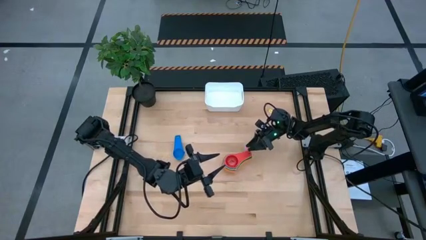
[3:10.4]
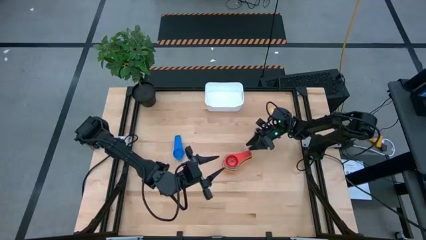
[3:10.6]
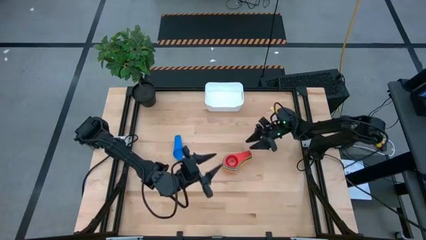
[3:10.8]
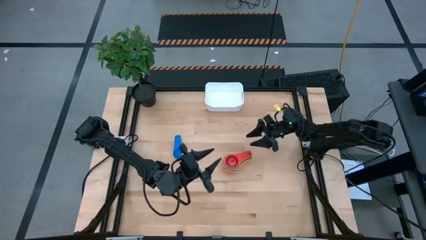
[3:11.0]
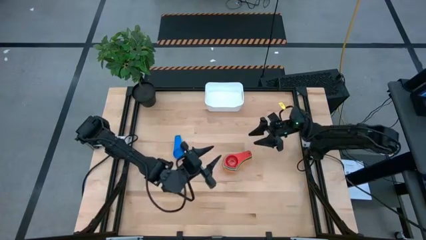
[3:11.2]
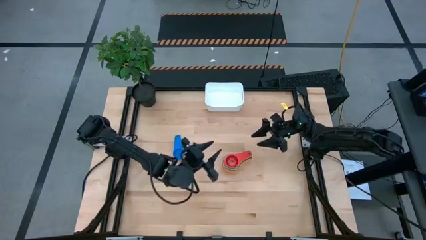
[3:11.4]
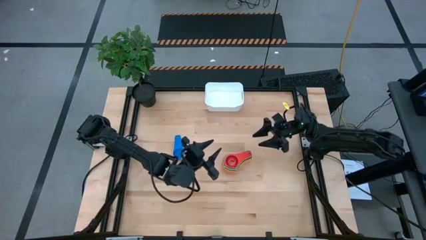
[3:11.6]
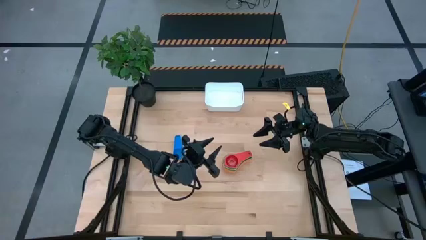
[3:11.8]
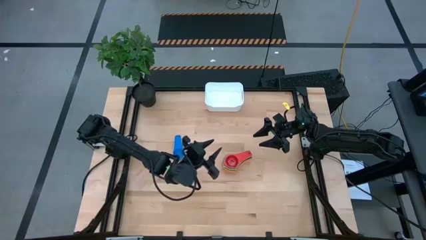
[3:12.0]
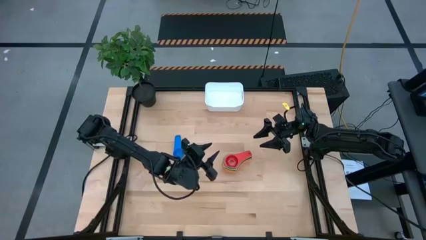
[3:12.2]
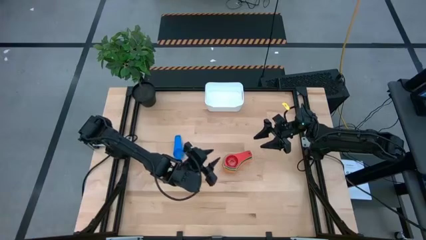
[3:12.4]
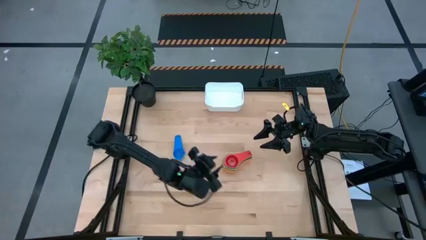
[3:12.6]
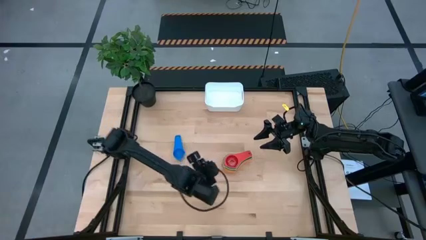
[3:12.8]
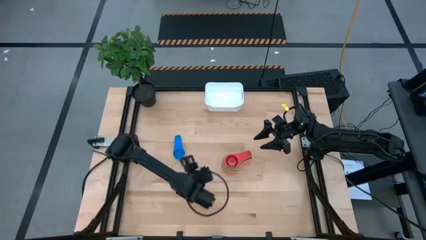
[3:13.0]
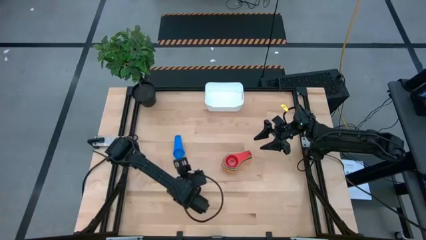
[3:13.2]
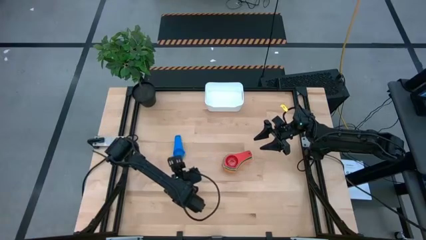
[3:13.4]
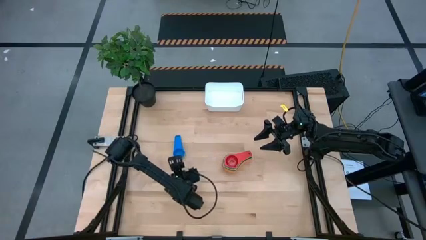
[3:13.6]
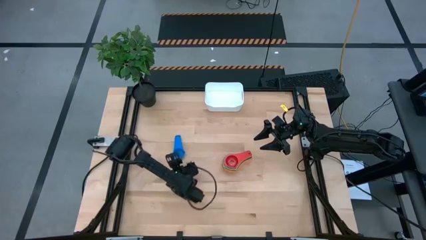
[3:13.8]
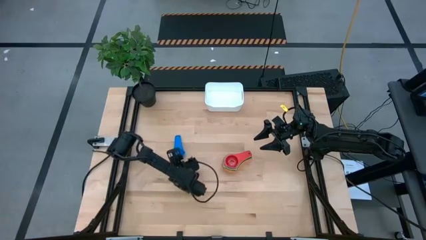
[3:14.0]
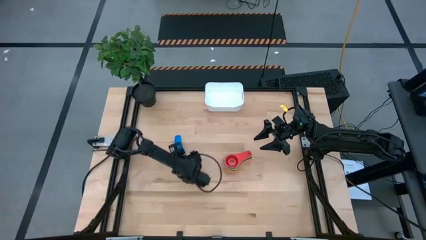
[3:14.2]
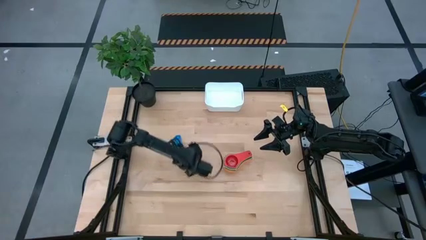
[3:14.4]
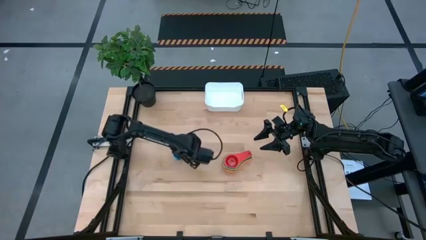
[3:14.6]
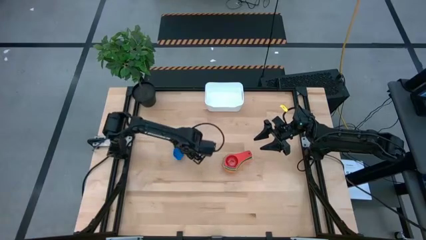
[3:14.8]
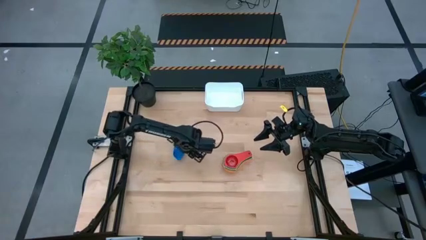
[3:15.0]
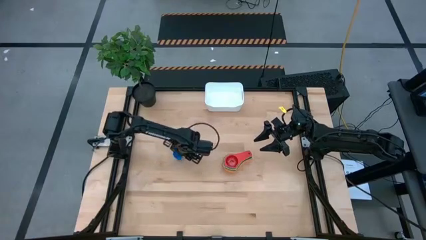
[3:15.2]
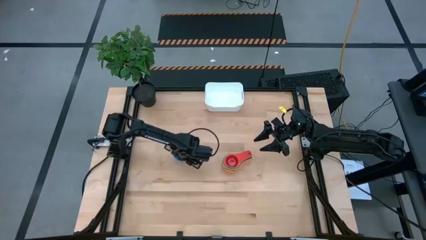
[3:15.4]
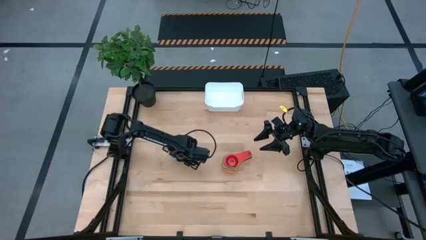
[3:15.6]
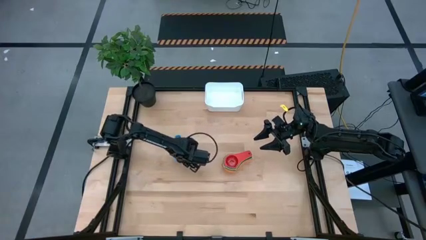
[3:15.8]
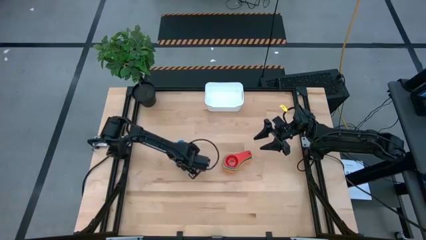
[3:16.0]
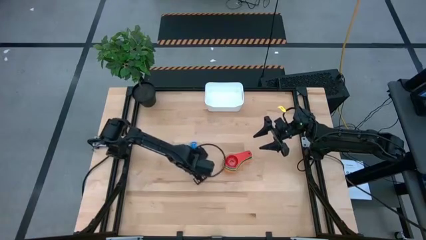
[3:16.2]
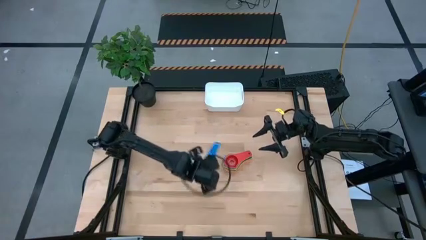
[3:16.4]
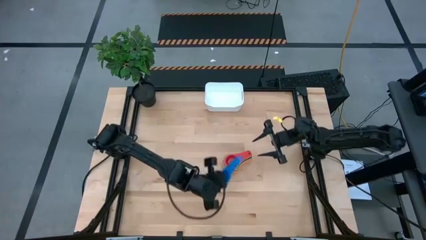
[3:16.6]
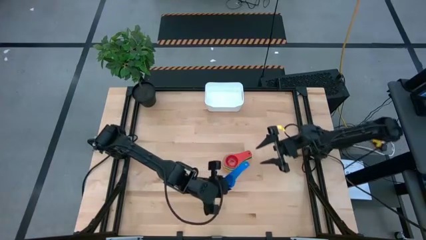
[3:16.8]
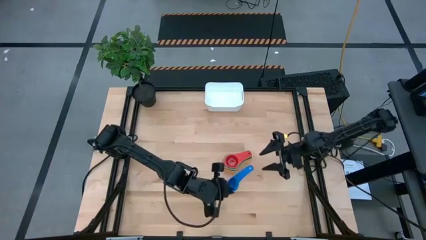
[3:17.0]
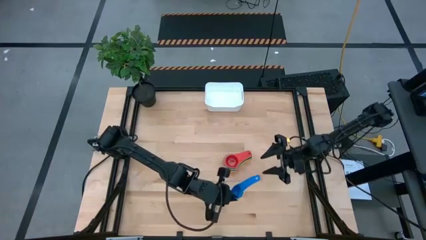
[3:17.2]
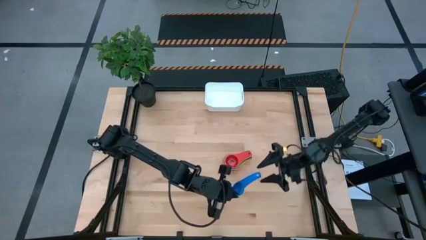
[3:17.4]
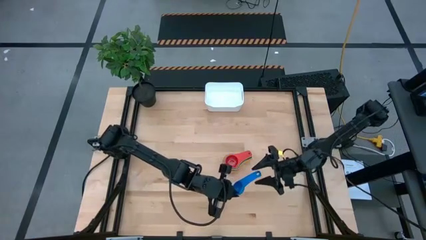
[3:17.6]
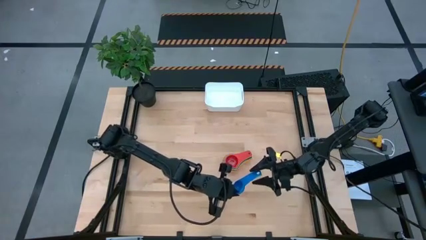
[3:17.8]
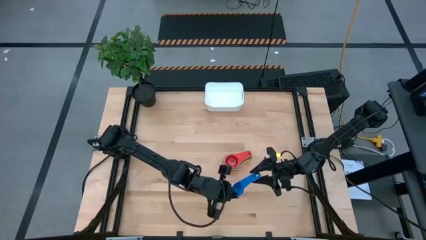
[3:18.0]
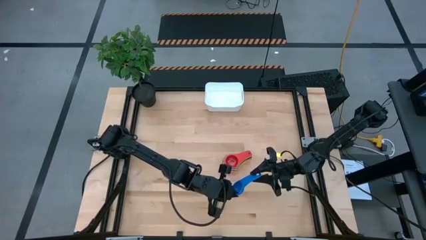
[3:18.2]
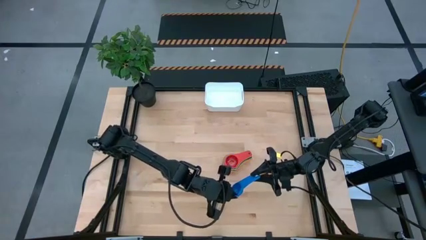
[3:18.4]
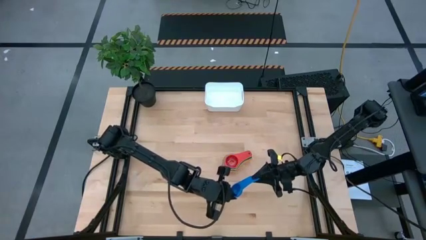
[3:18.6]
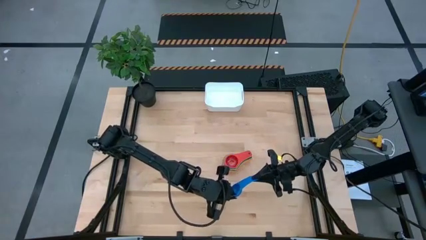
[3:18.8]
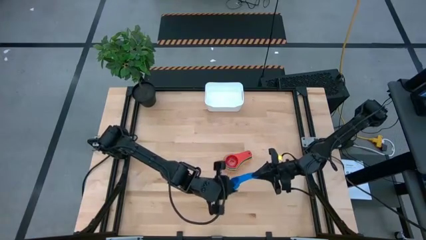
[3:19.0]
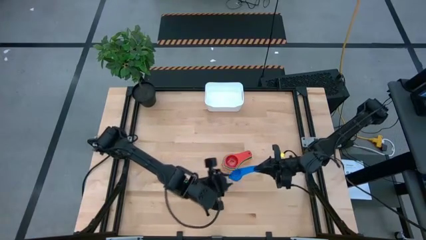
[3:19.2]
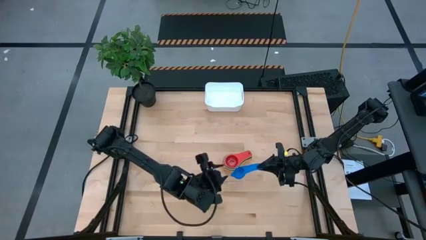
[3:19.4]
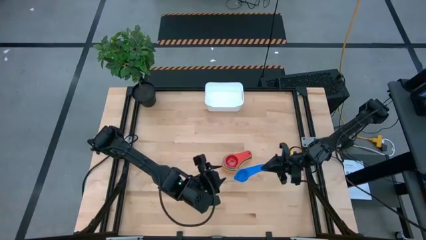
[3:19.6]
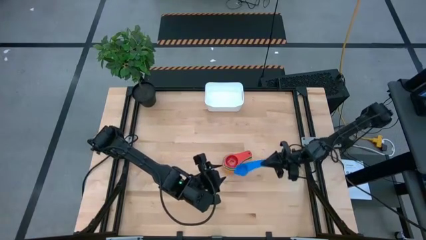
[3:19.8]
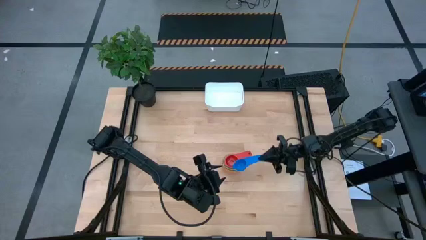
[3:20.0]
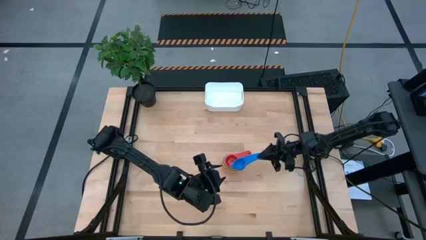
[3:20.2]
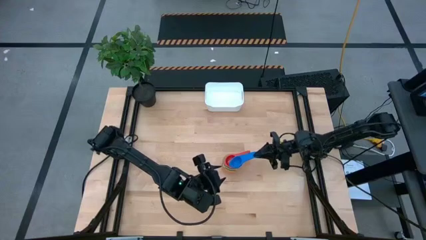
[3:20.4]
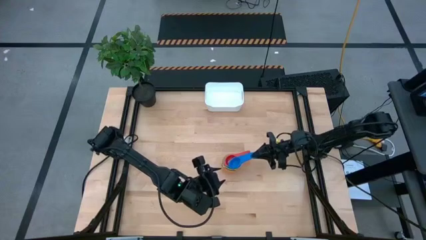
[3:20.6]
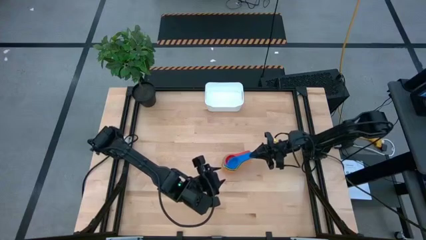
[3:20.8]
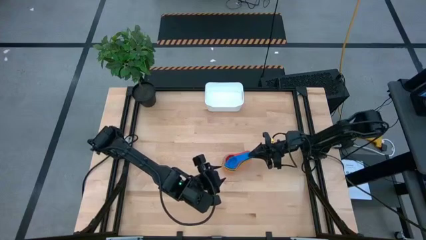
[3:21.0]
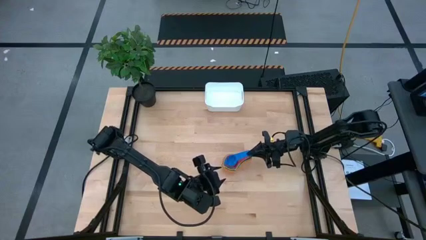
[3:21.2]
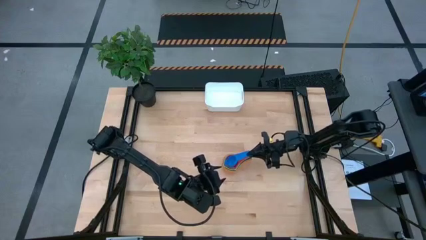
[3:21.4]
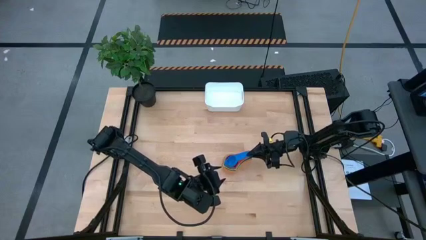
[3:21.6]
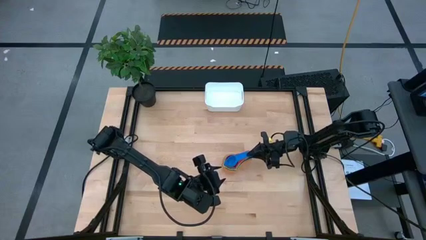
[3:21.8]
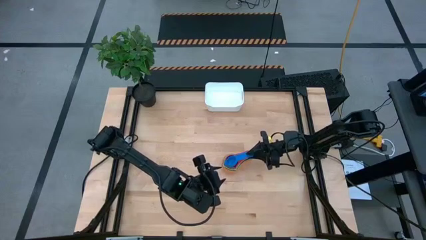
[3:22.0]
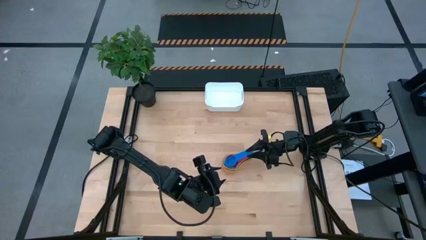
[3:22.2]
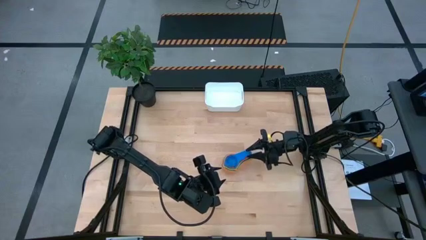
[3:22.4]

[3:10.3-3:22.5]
Task: Nest measuring cups in basket
Stack the blue measuring cup on top of the red measuring cup
